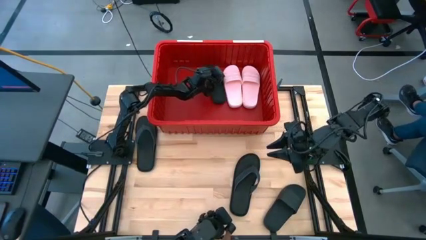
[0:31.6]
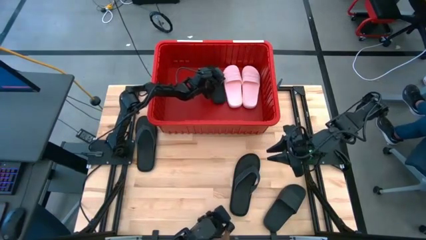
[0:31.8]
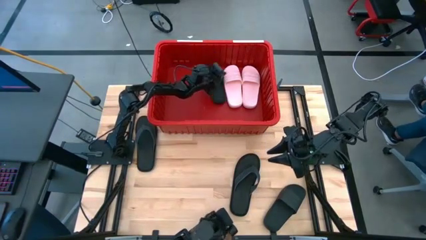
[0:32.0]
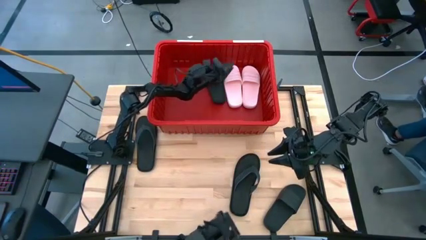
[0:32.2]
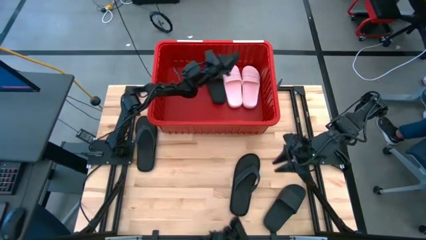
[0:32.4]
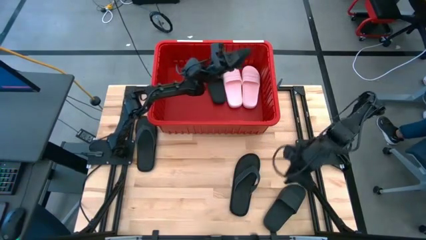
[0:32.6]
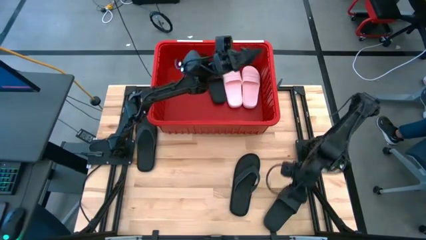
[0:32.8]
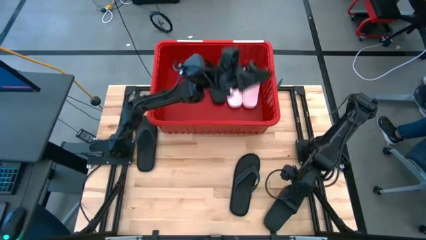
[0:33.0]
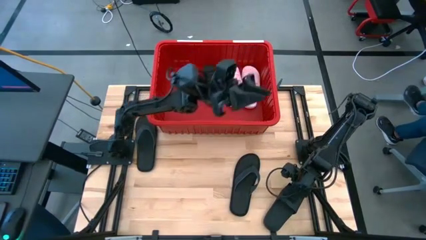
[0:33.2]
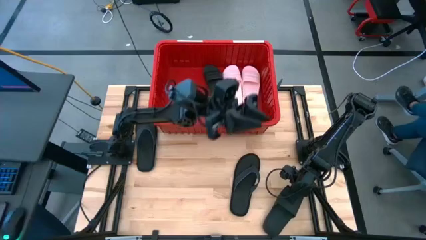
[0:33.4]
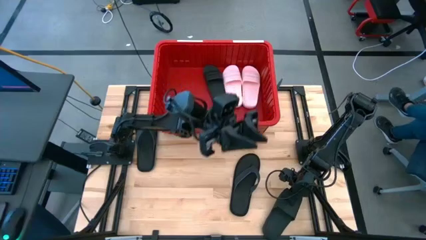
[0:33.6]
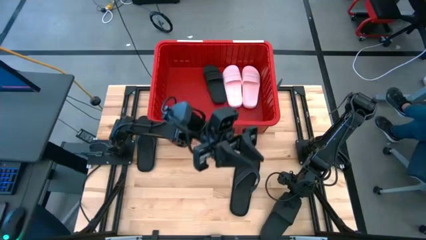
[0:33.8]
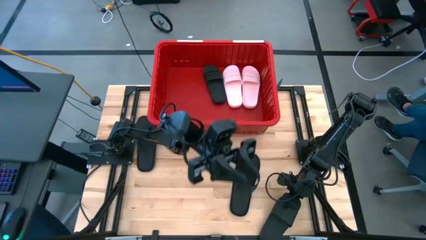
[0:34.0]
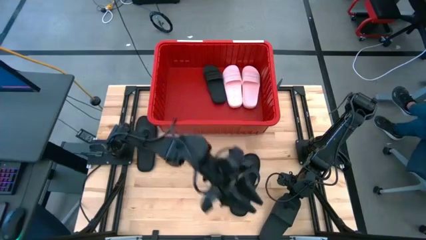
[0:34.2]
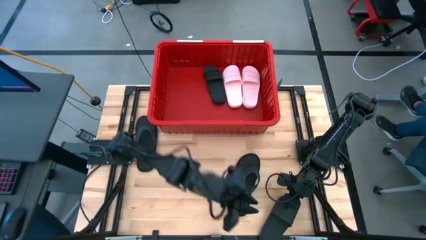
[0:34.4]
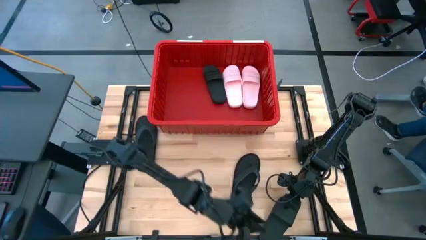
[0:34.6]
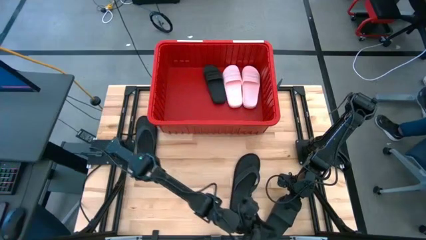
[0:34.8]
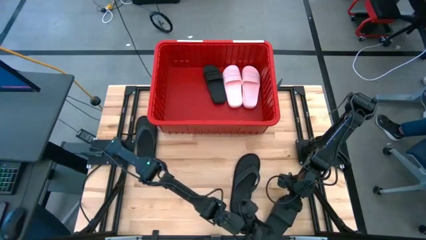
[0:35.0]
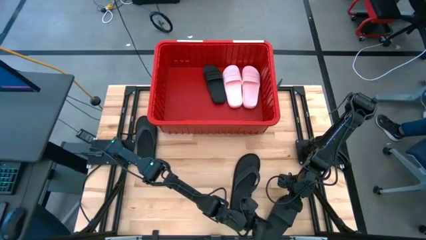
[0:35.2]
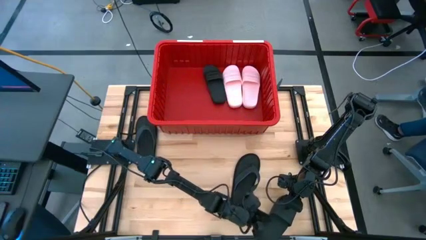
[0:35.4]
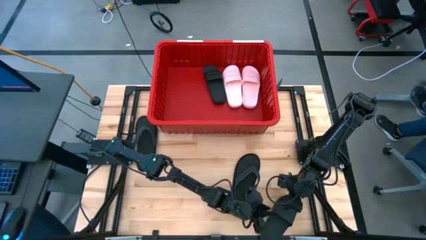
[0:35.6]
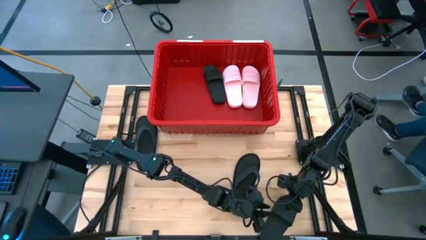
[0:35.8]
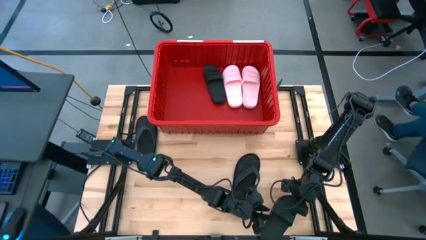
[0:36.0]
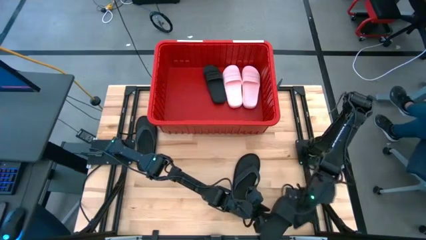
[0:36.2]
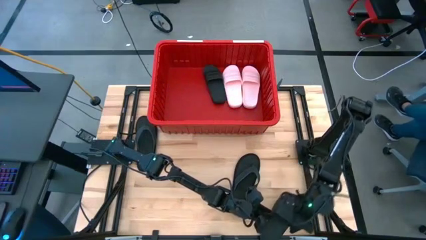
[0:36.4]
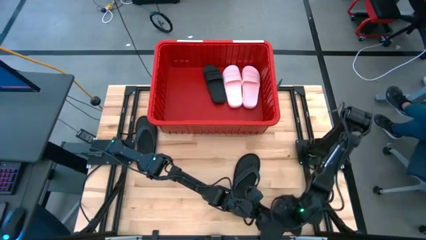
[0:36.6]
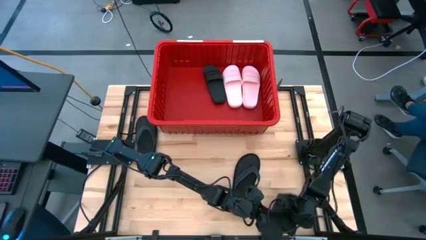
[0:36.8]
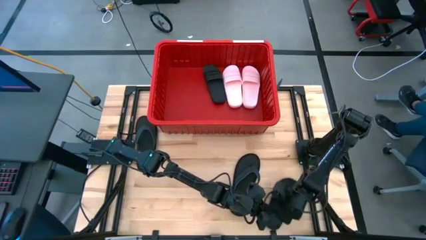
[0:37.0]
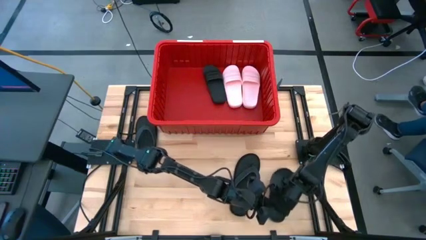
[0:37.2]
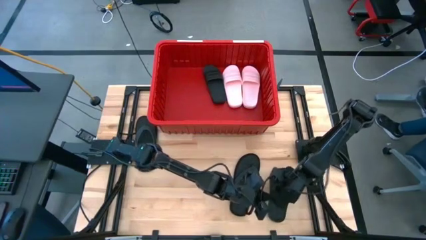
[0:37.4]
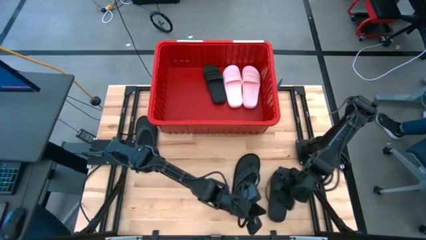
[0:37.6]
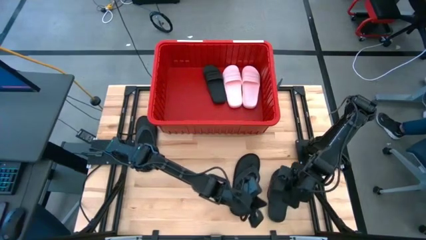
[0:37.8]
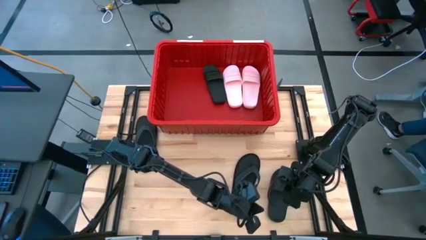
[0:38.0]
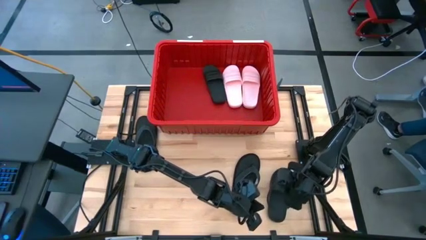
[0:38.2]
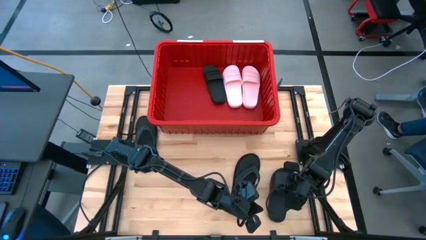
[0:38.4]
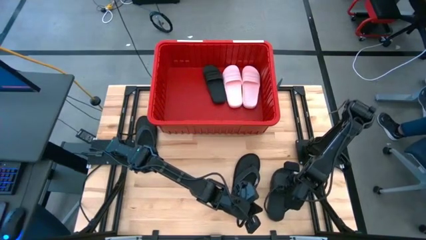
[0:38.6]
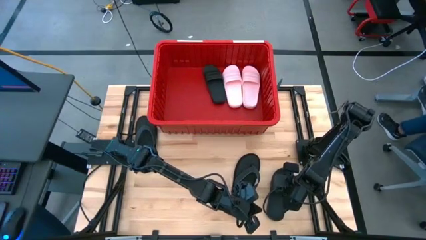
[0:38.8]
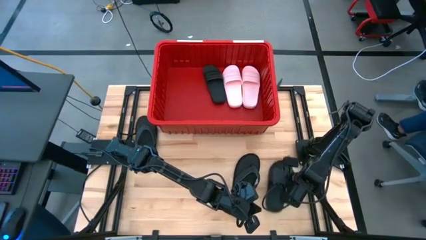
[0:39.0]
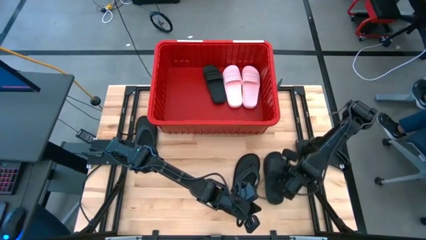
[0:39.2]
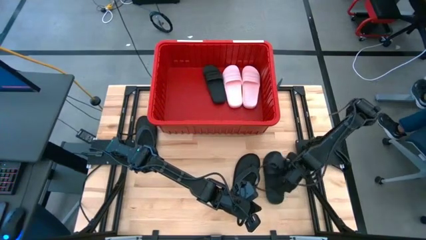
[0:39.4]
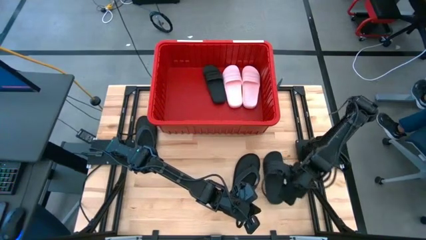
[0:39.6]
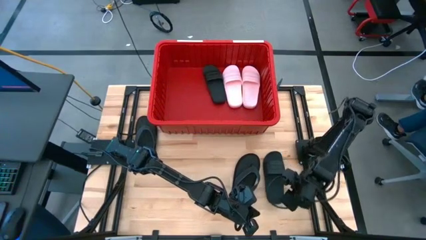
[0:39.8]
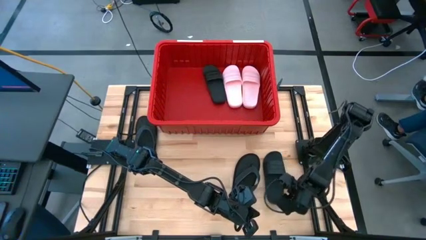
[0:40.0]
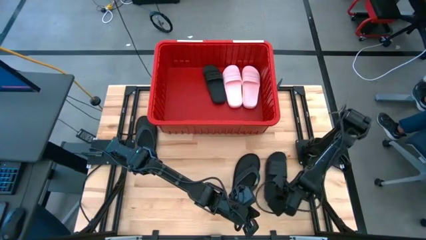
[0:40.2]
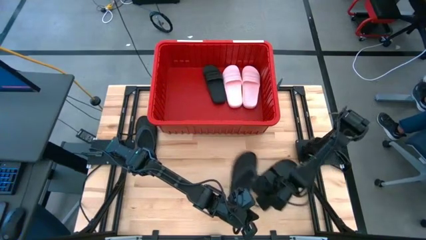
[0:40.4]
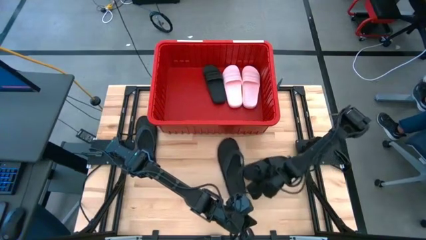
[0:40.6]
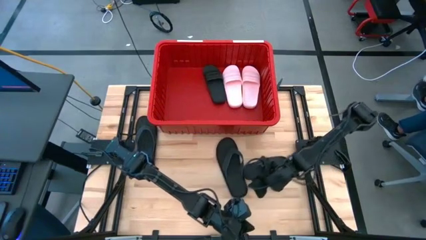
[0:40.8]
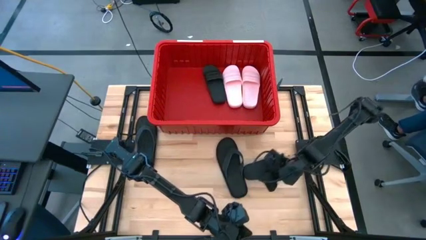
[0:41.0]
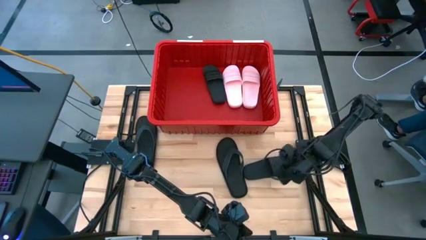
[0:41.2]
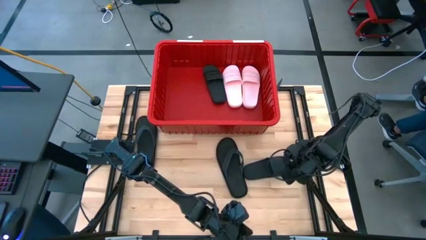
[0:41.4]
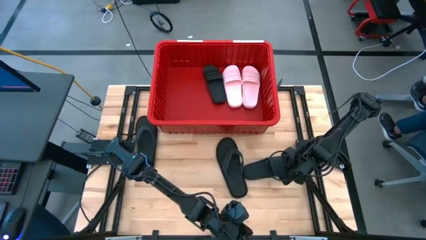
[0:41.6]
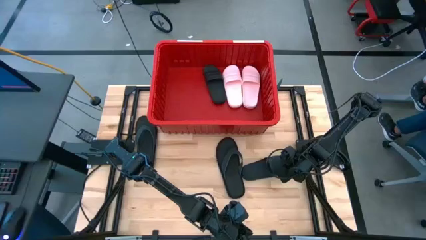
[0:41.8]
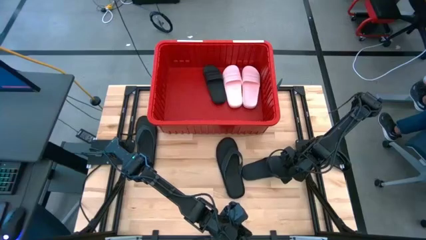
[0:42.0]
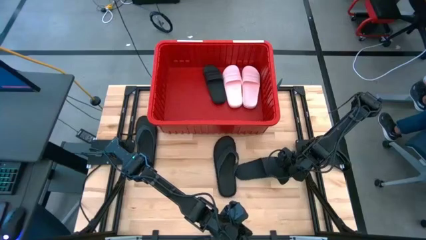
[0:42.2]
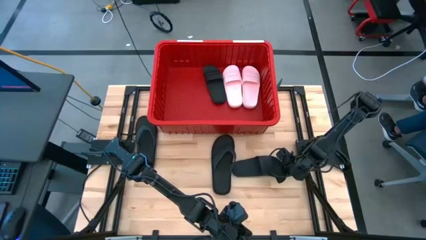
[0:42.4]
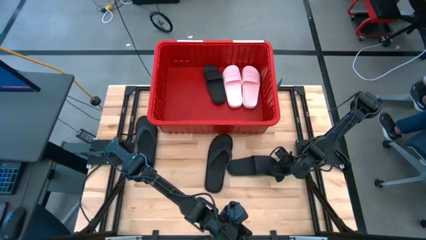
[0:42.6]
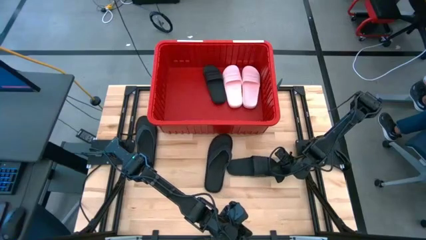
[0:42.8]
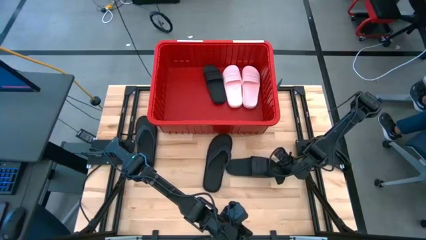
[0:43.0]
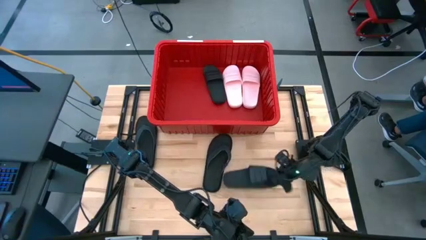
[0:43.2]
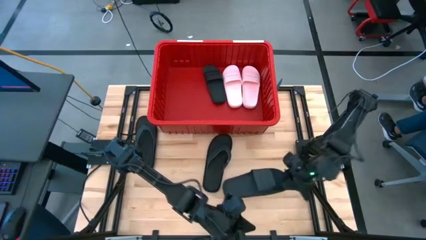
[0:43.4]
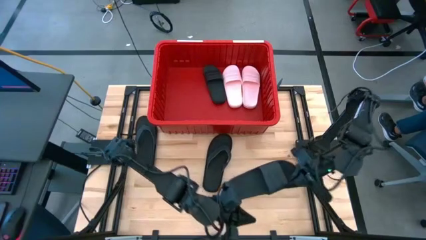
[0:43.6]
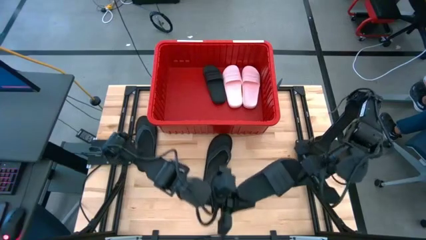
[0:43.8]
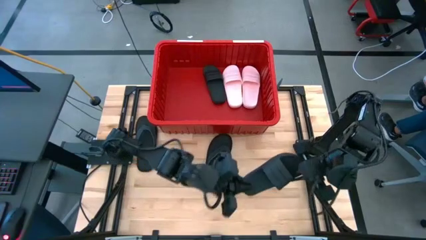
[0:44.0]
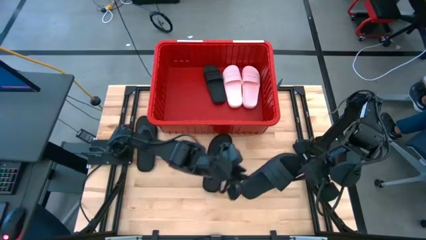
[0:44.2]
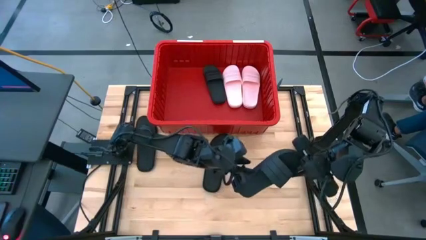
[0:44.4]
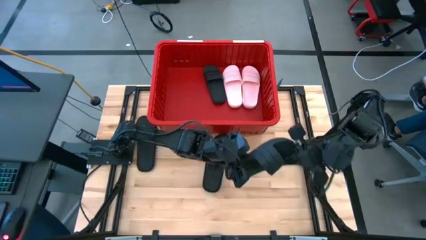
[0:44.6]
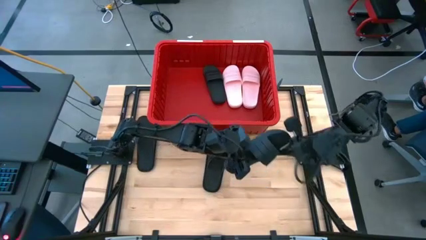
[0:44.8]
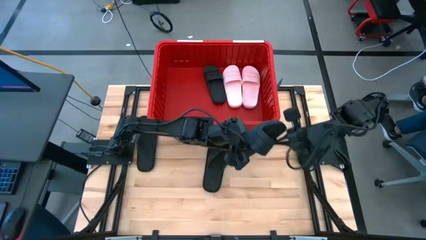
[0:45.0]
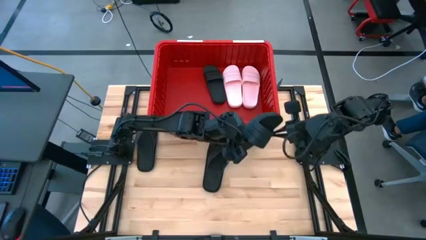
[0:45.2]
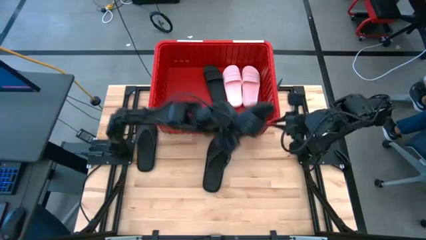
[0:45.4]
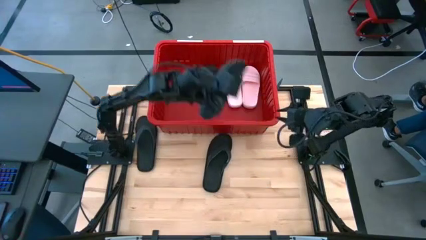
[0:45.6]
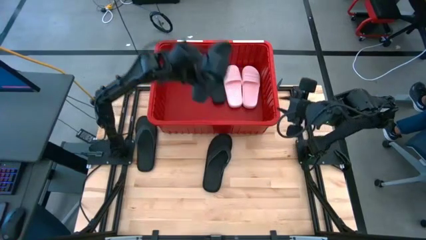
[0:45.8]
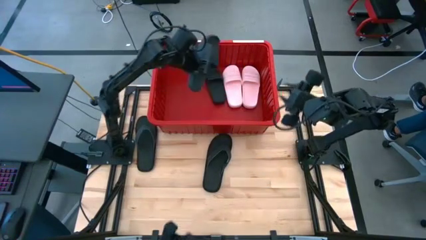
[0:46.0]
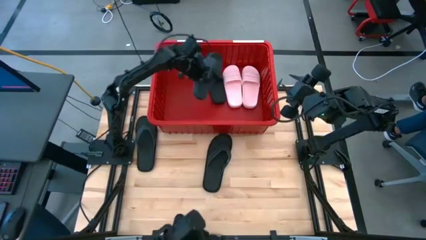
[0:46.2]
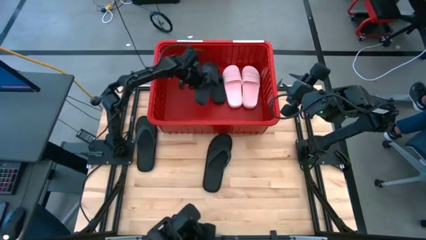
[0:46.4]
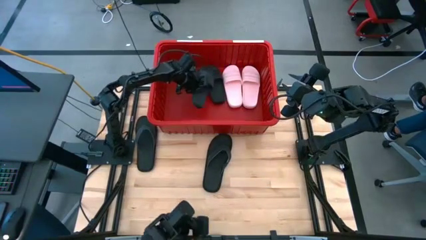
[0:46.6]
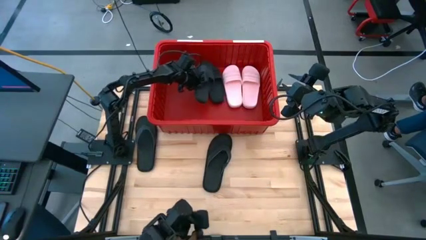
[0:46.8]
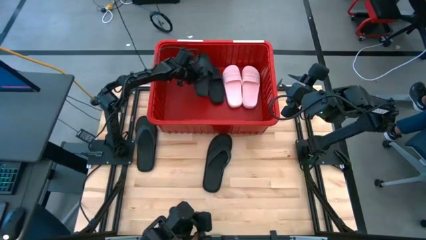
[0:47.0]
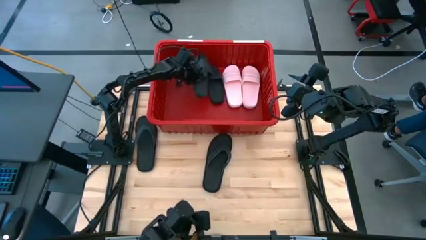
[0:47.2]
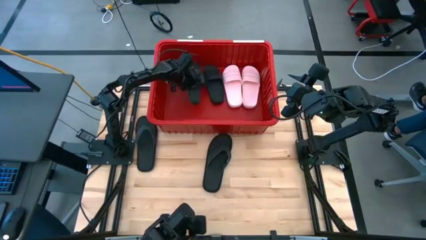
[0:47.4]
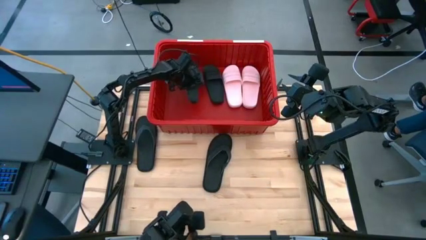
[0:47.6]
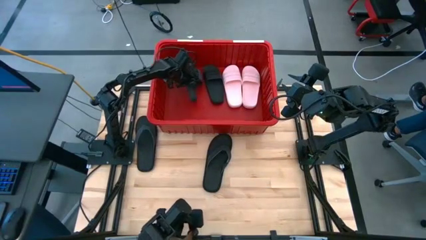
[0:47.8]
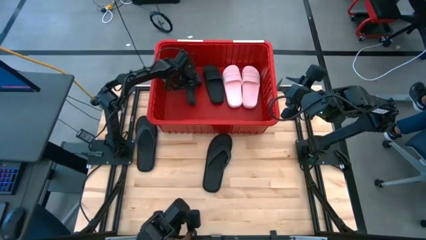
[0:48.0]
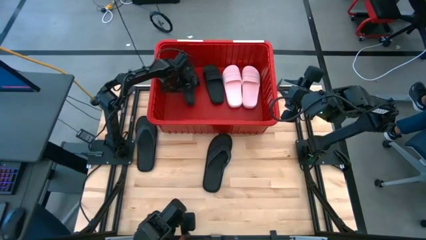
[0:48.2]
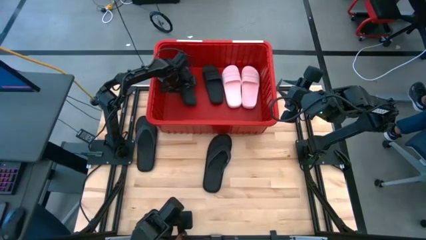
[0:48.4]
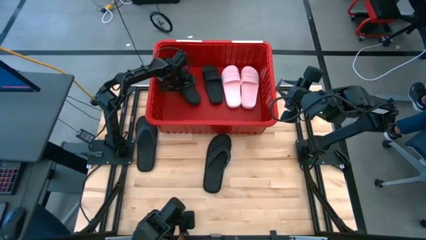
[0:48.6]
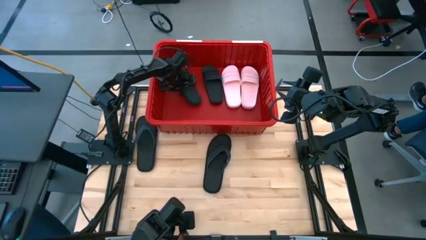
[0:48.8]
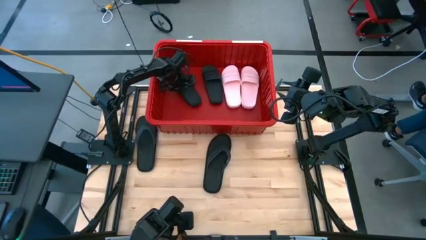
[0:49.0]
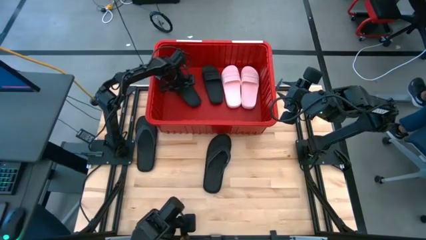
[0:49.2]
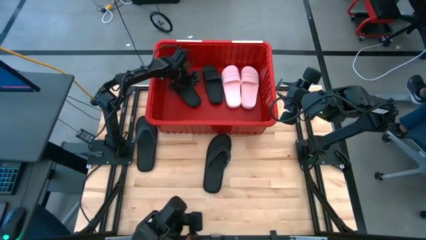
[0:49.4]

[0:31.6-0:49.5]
Task: Pick and place slides into bin
Put the black slide into the red bin
